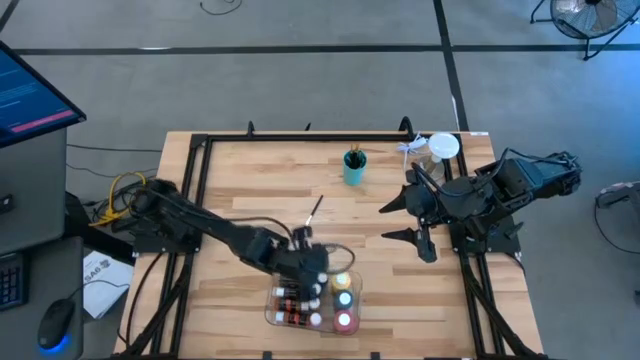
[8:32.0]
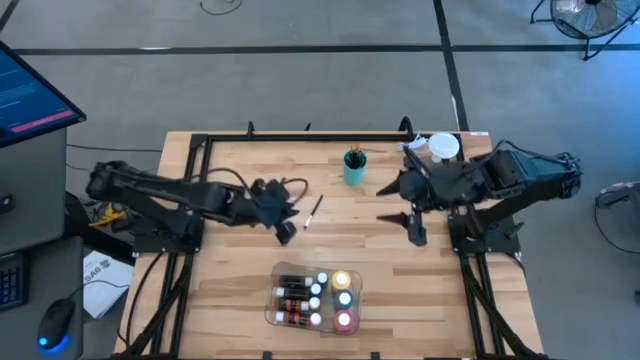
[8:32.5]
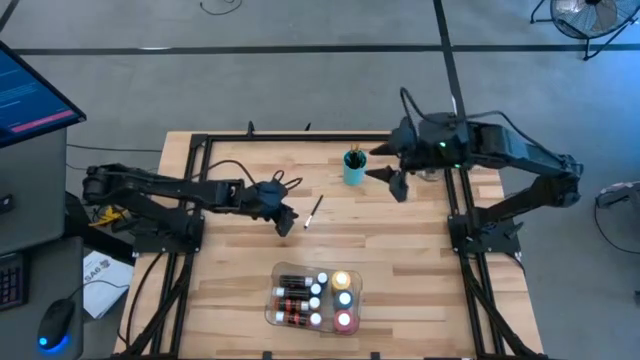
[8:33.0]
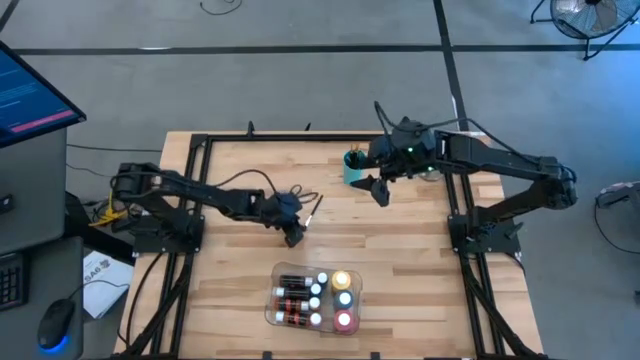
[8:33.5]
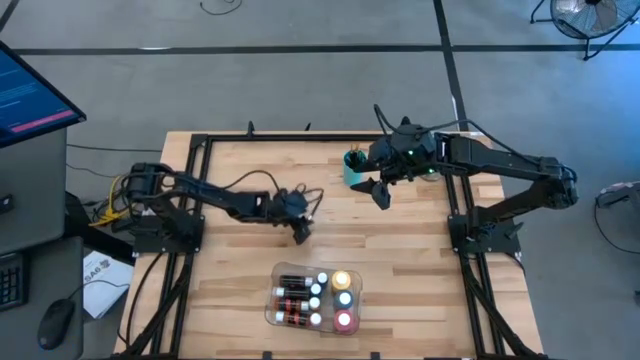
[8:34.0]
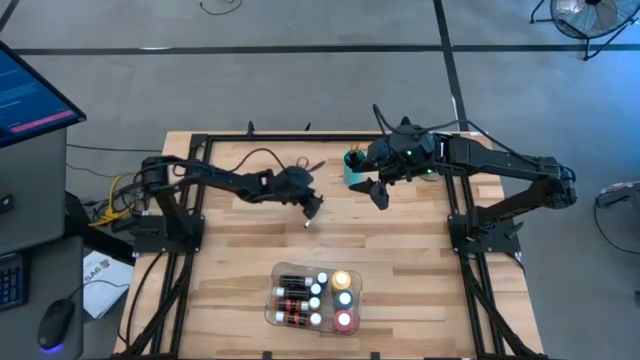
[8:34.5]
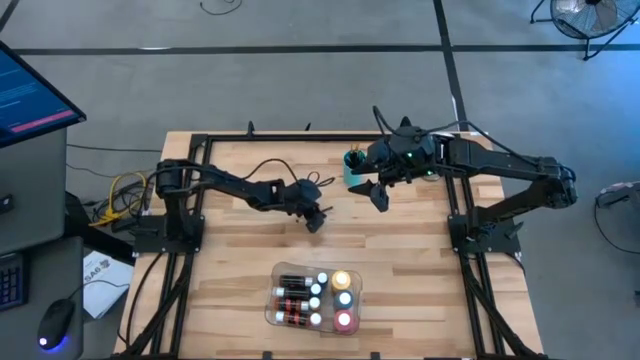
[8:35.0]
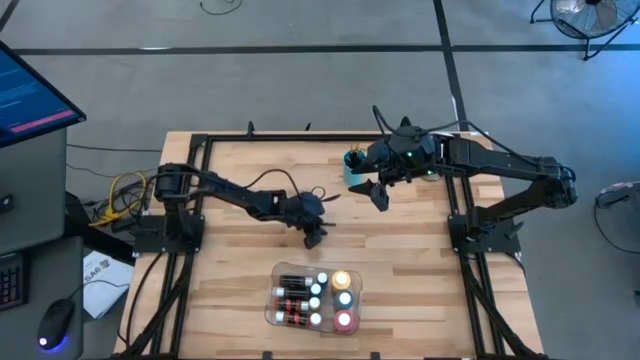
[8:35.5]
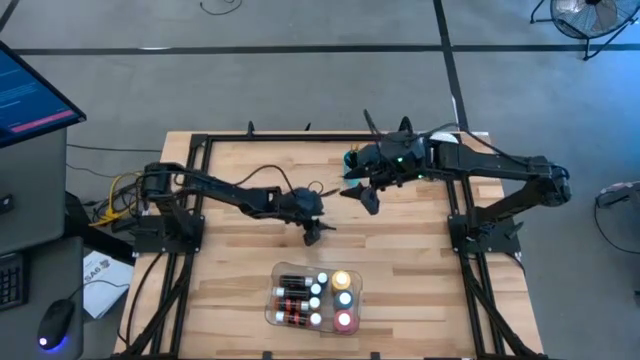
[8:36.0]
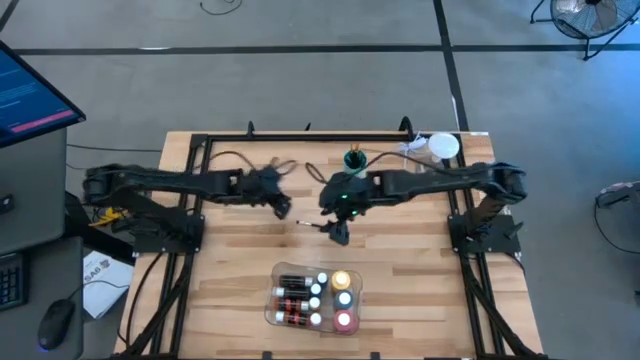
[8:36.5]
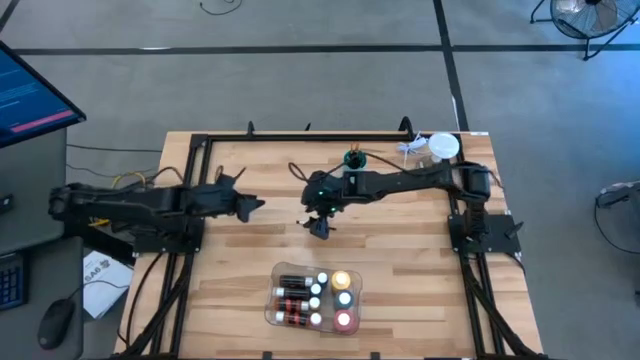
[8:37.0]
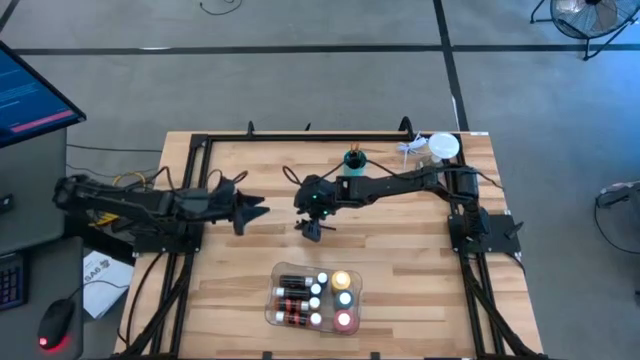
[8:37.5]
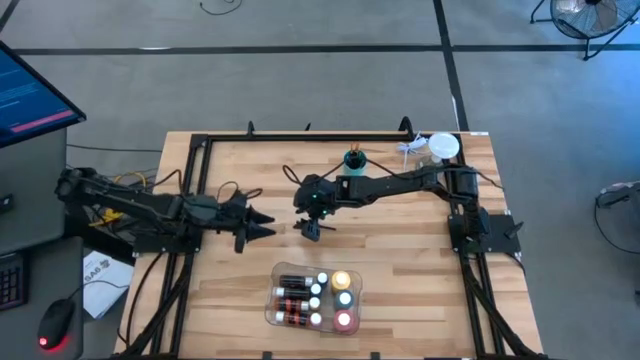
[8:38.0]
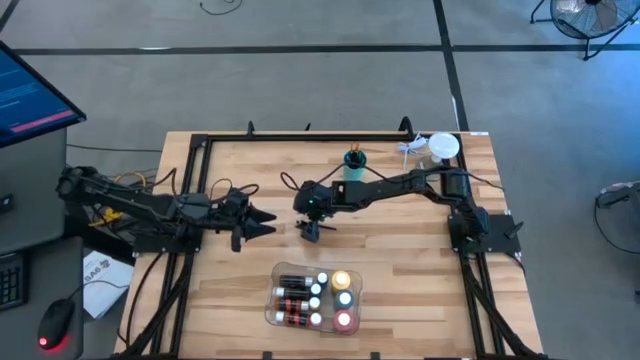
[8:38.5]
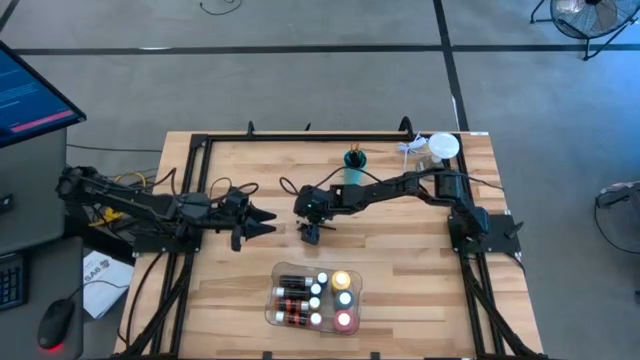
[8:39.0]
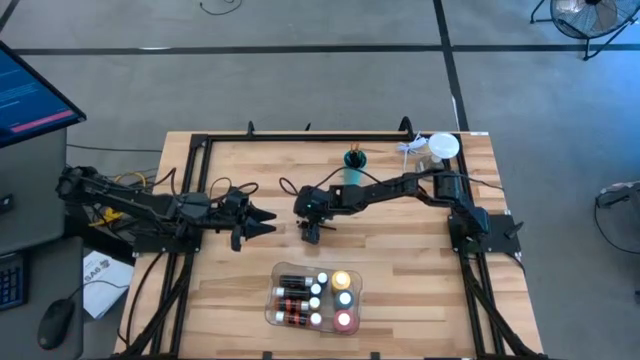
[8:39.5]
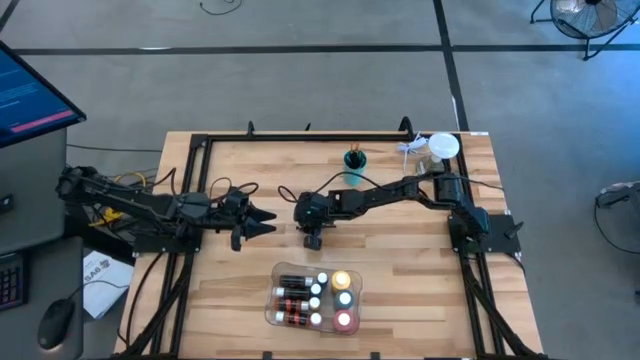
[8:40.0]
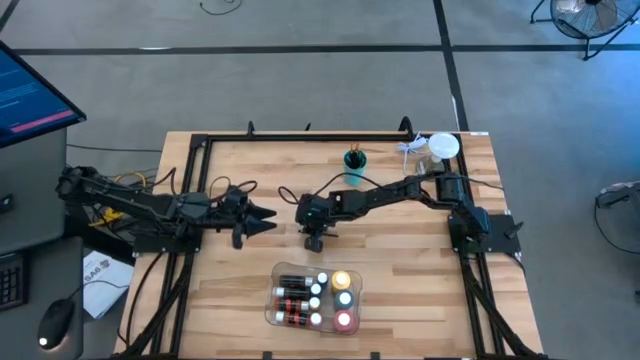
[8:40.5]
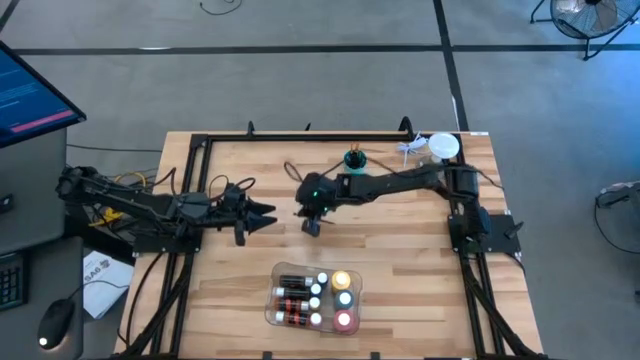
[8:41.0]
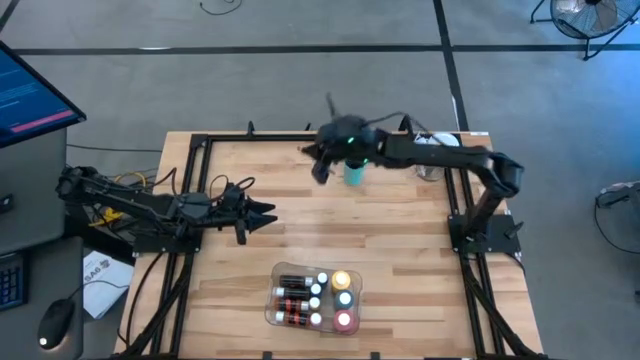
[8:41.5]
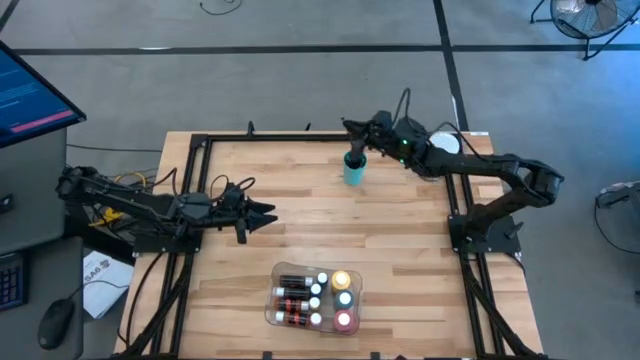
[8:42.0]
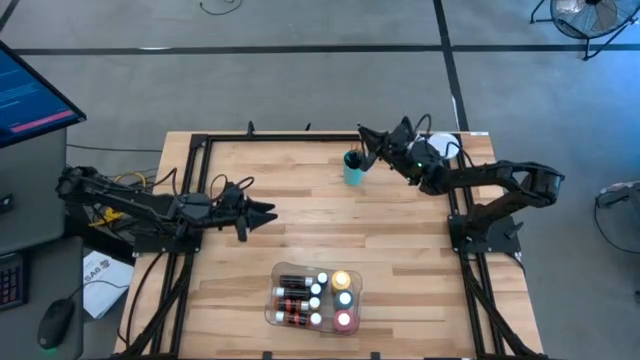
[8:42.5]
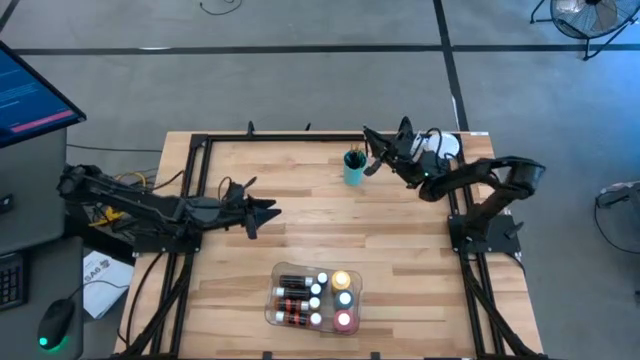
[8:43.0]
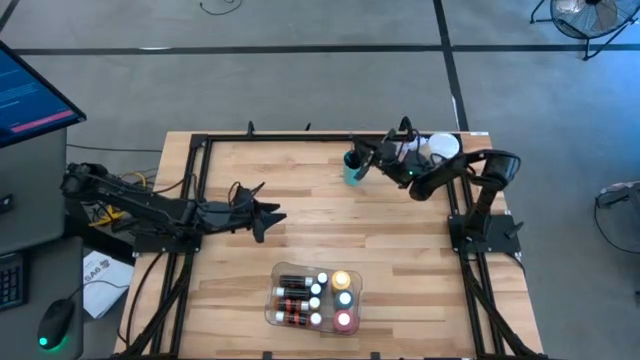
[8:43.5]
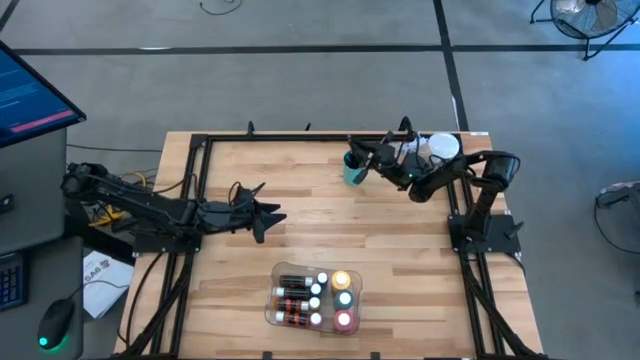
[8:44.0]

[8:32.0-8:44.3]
Task: Pick & Place Paint Supplies
Put the silver paint brush into the green cup

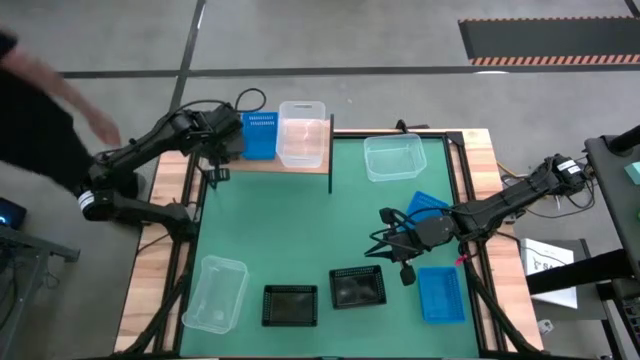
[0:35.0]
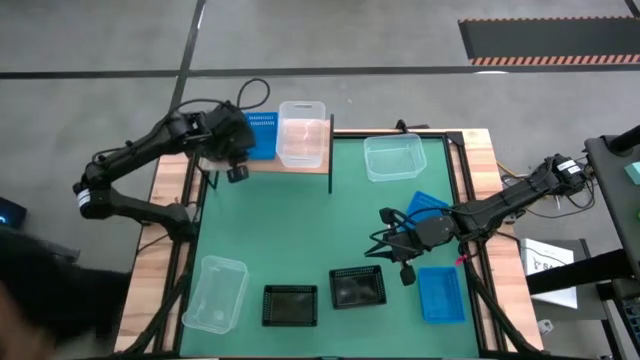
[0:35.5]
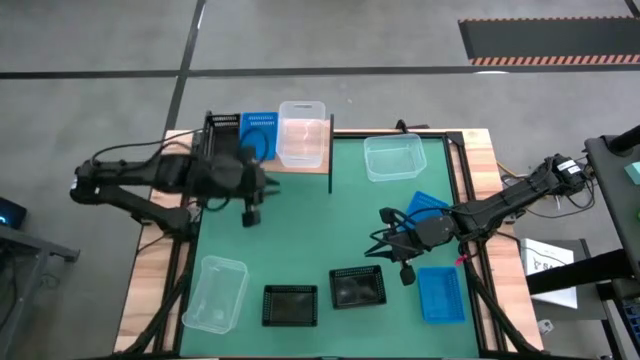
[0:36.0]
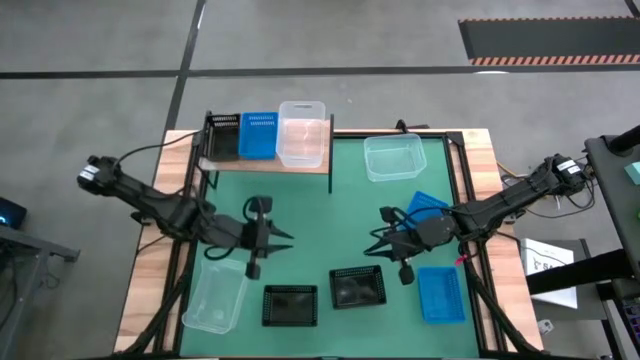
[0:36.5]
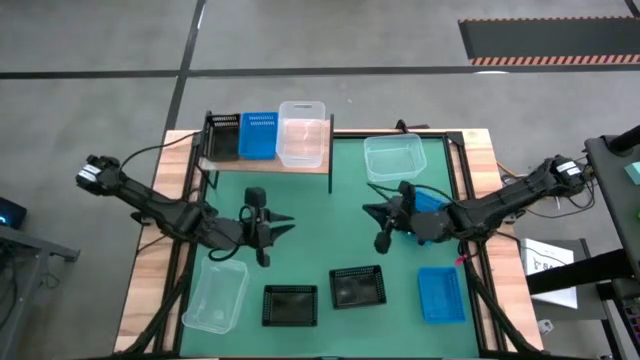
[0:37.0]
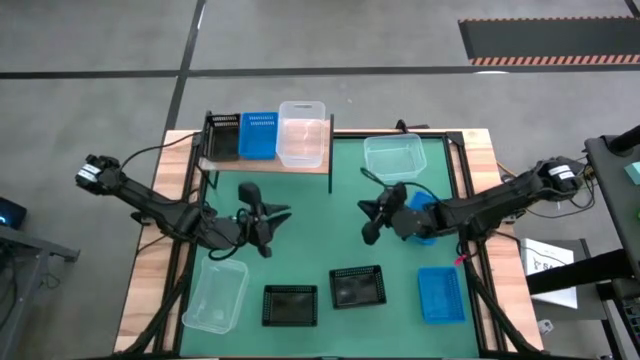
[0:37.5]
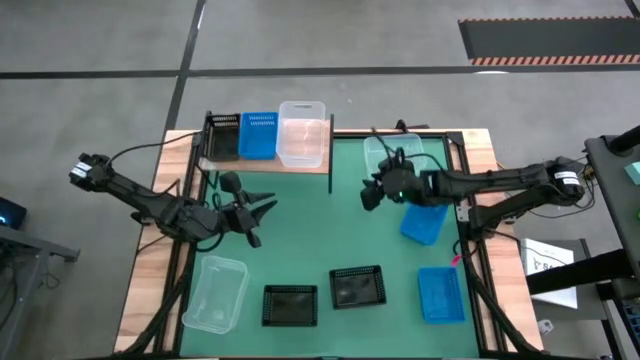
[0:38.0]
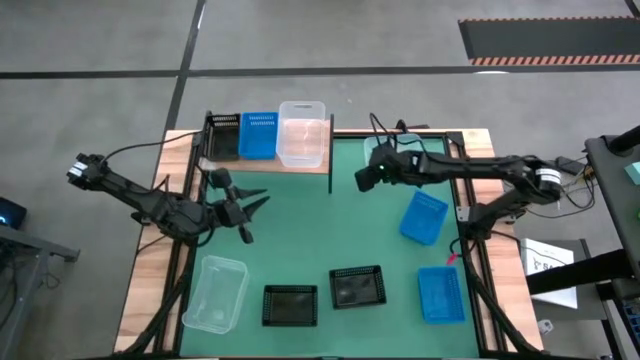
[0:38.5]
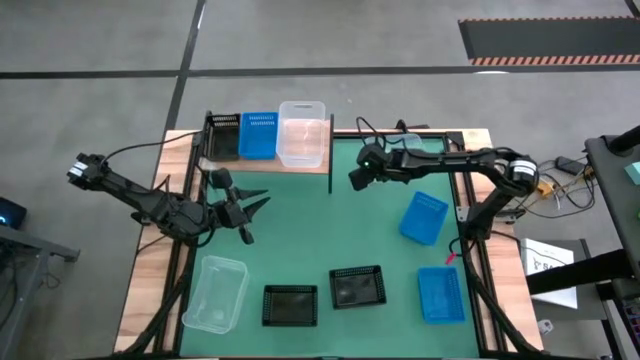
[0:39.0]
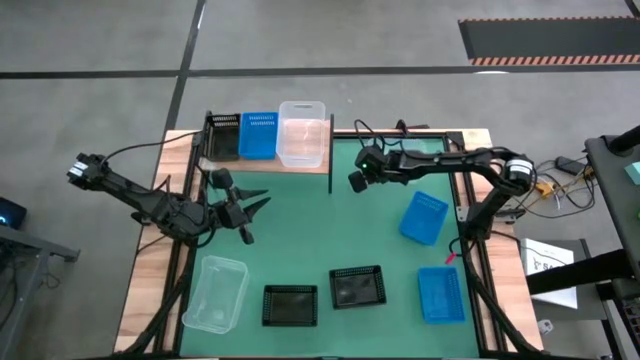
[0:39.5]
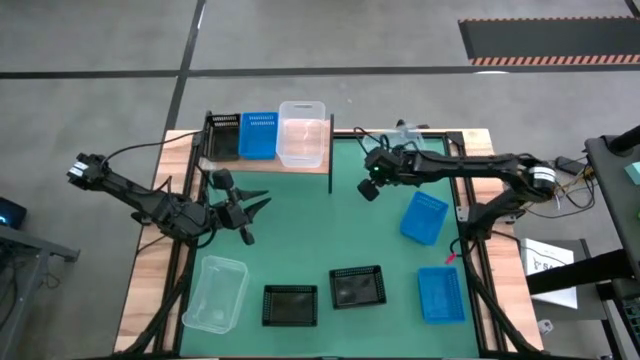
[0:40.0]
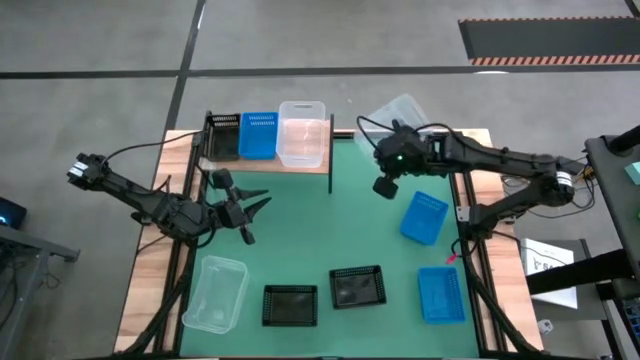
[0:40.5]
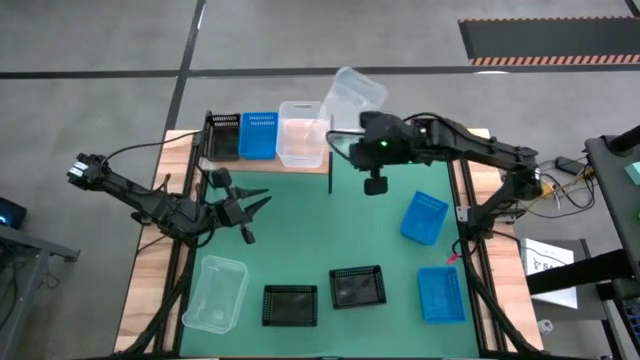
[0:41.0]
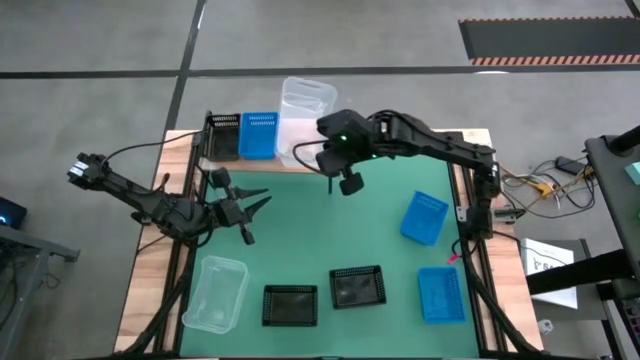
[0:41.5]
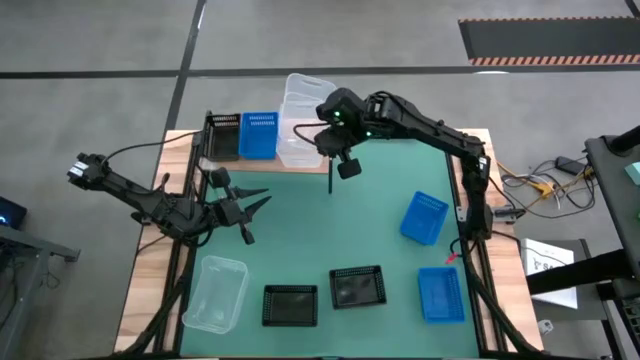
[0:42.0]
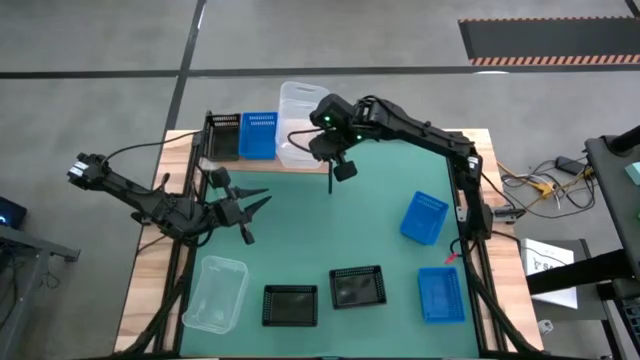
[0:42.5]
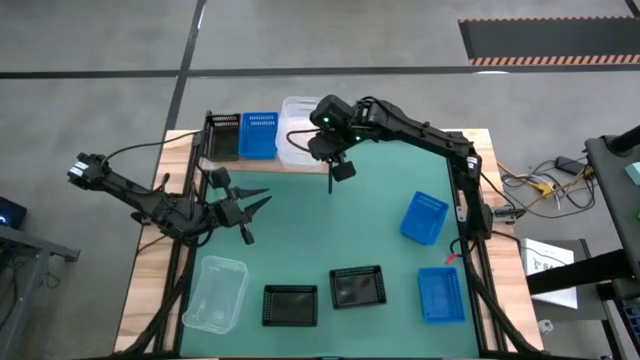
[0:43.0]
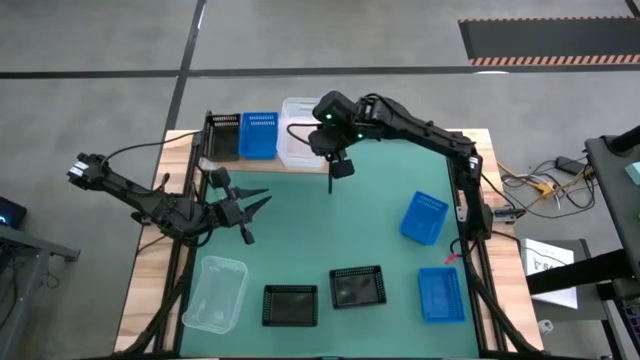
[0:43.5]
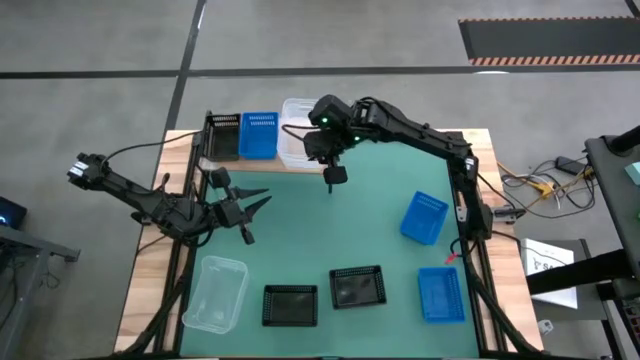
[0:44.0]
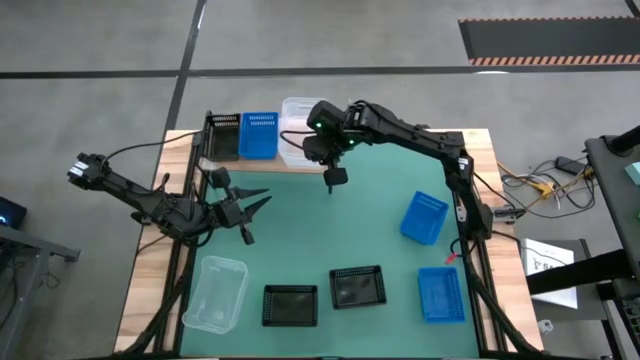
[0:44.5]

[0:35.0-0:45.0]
Task: Stack baskets on shelf by color
Stack the top transparent on top of the transparent bin on the shelf
